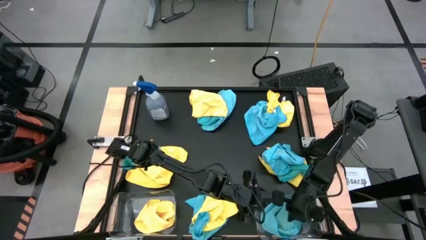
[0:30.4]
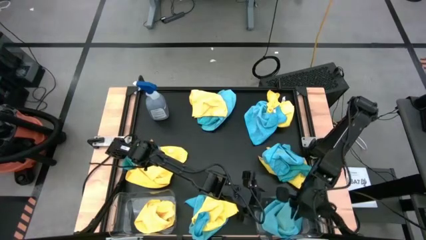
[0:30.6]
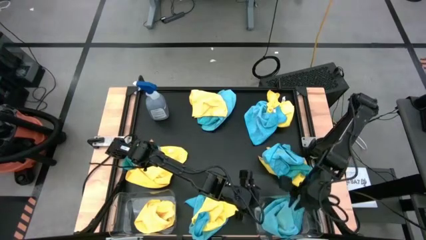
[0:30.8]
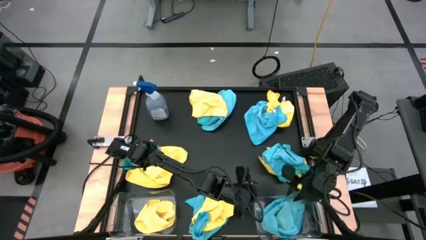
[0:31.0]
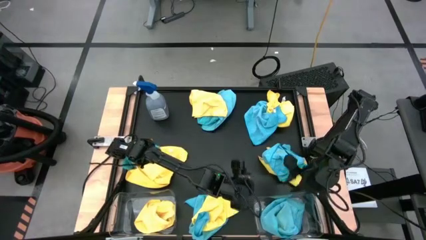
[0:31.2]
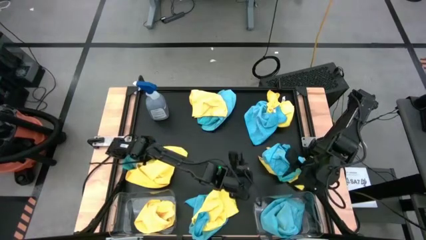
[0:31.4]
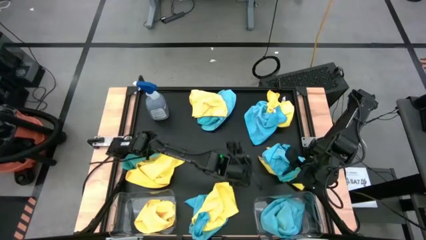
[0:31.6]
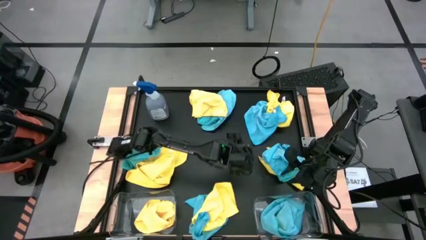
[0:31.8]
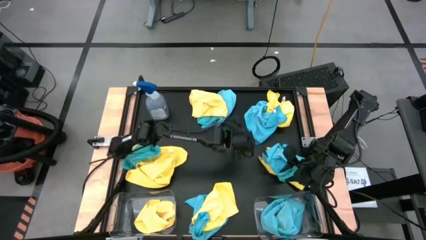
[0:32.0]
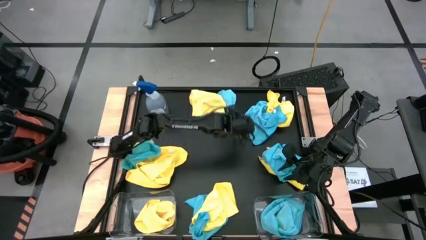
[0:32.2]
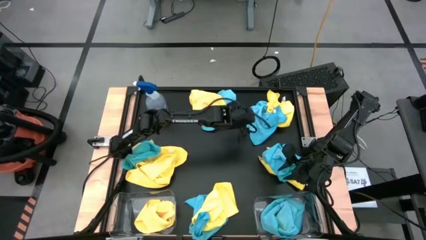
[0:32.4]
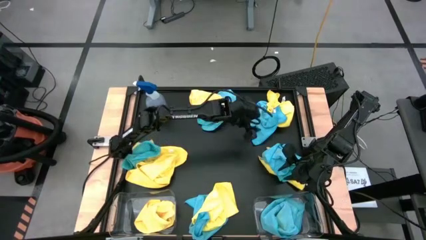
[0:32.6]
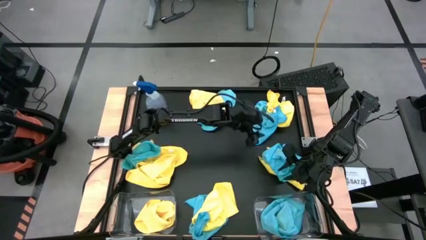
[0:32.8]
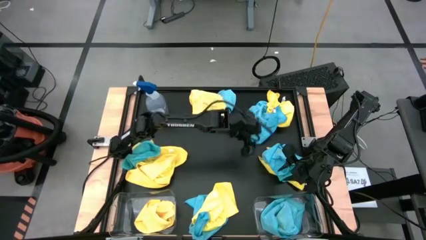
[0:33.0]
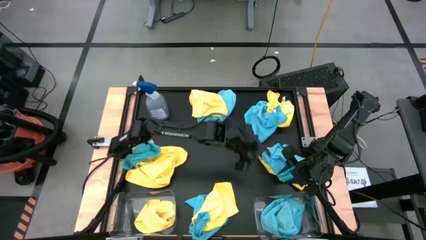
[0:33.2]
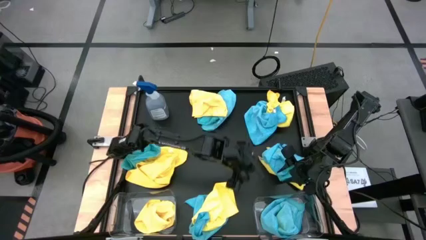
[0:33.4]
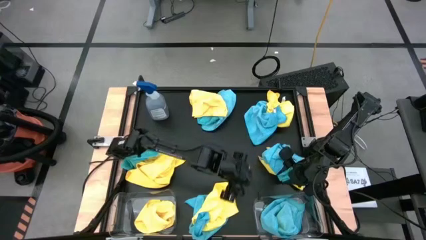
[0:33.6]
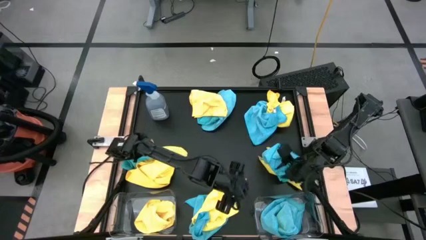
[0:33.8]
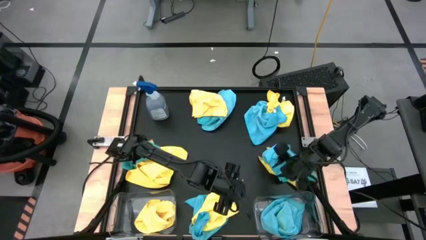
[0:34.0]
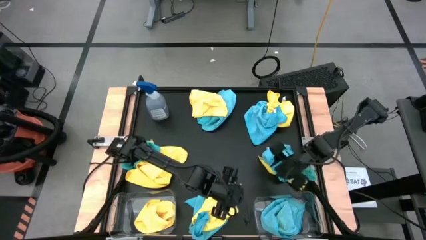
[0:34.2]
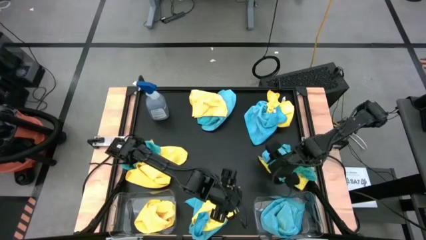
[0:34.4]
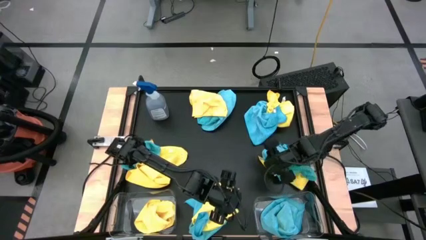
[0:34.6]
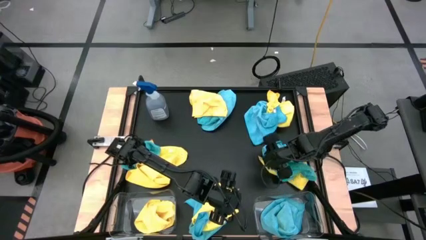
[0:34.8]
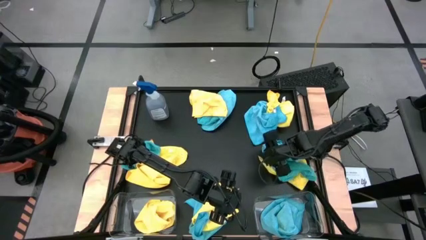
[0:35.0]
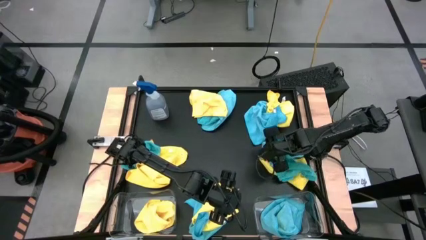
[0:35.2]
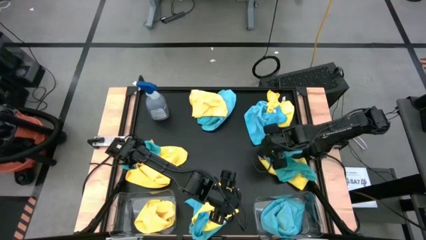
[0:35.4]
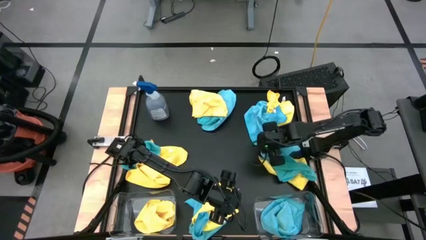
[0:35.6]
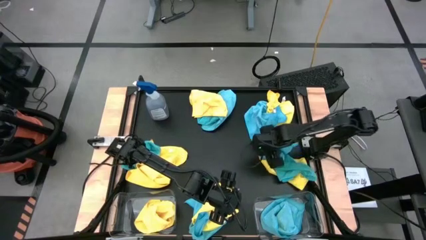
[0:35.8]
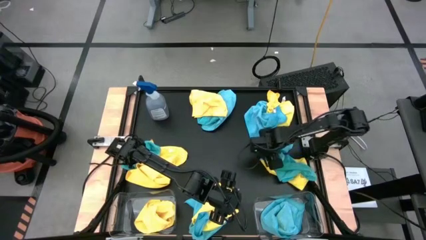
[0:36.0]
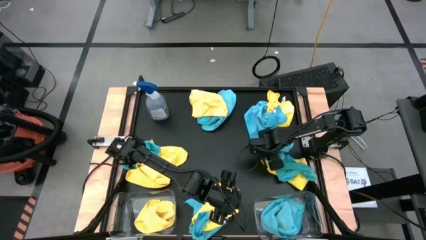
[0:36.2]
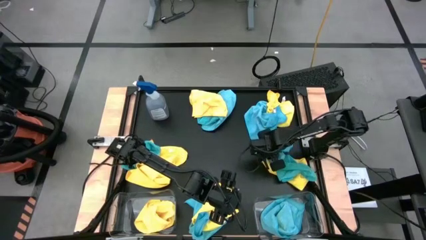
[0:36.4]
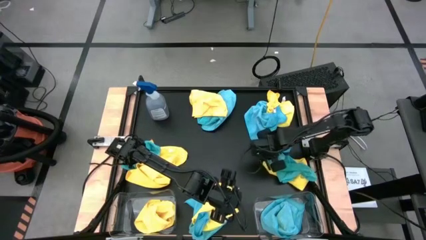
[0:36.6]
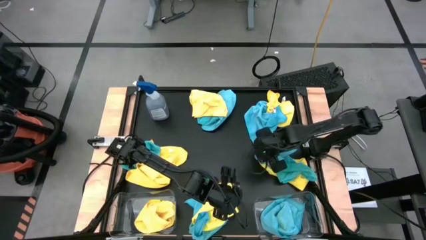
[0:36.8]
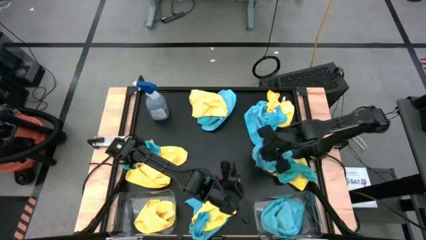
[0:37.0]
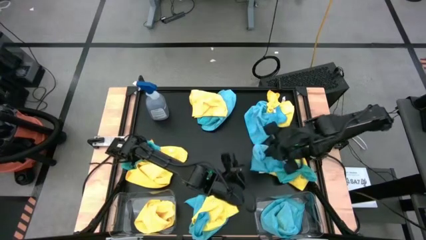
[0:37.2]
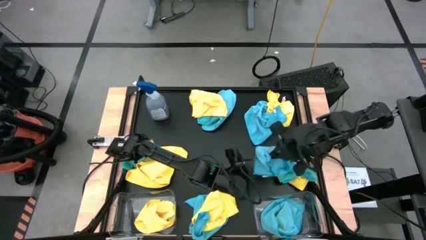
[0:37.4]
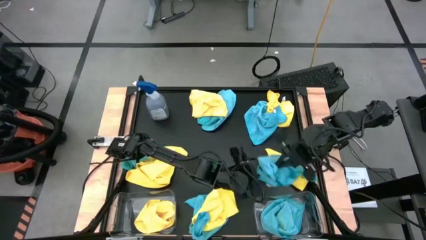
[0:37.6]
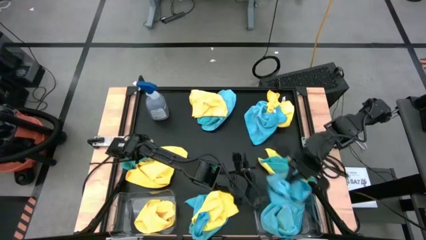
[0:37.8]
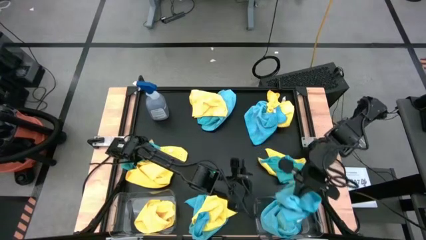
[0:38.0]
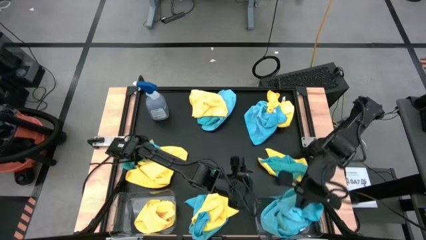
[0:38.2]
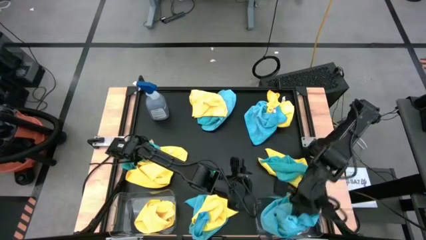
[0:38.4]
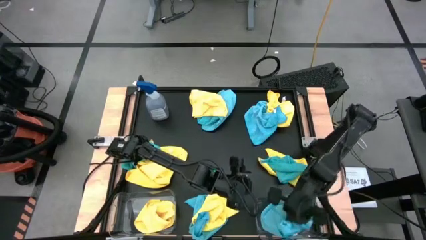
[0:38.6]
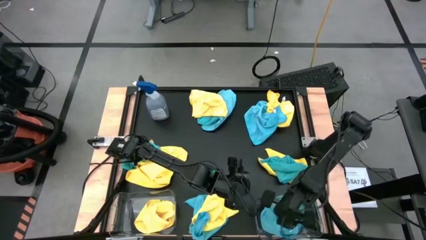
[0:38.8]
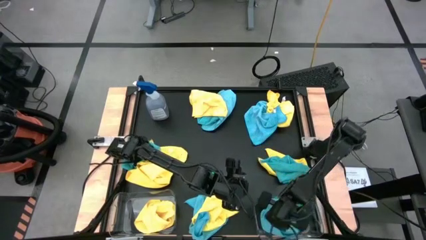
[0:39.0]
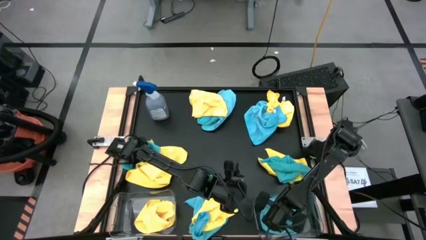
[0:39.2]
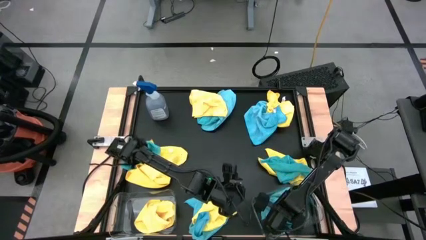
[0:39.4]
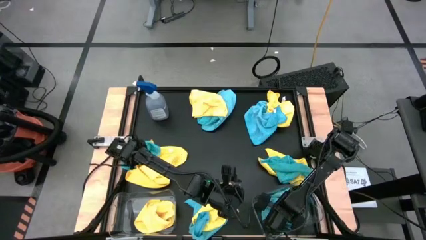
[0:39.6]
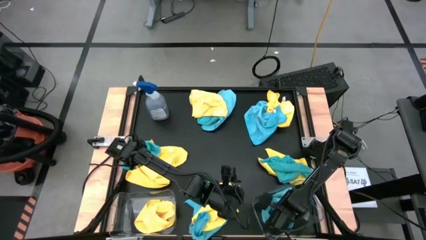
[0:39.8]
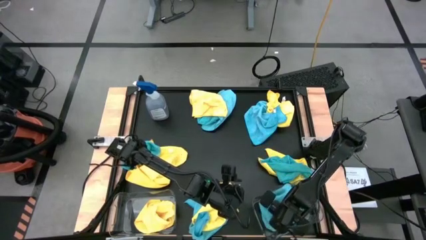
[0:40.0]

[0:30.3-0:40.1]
Task: Sort microfiber towel by color & place in baskets
Put the blue towel into the right transparent bin

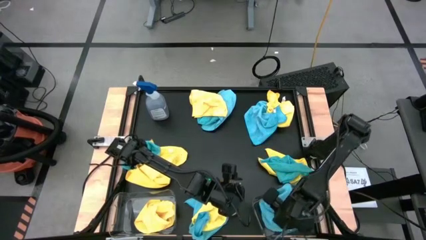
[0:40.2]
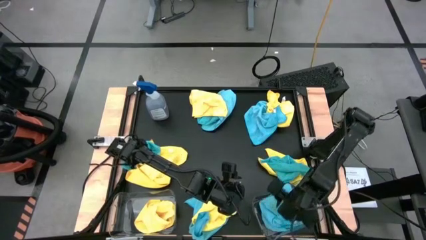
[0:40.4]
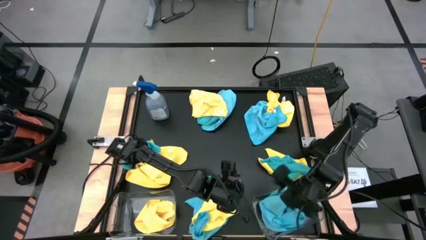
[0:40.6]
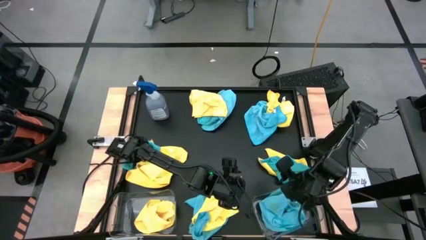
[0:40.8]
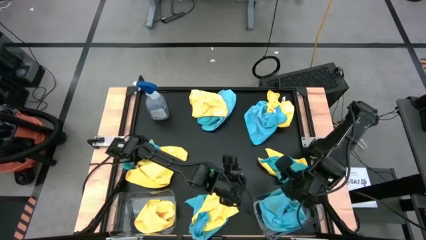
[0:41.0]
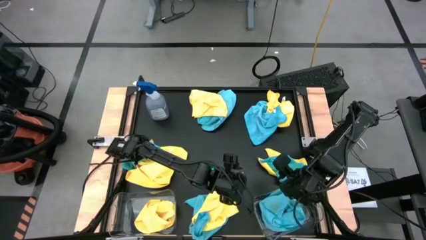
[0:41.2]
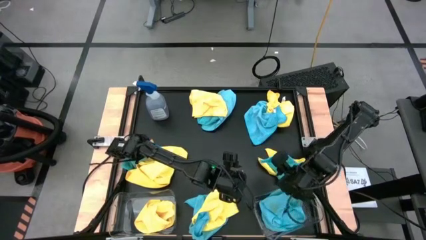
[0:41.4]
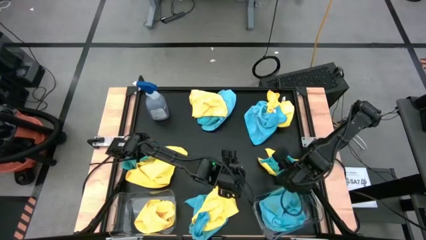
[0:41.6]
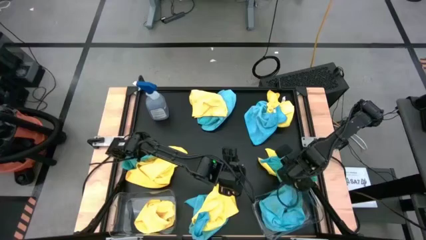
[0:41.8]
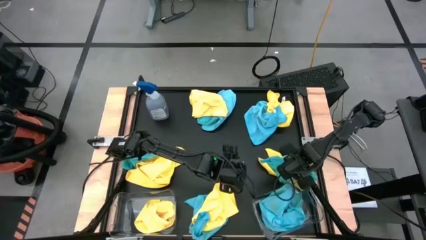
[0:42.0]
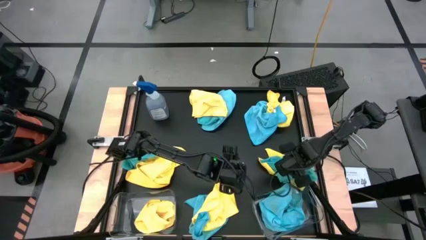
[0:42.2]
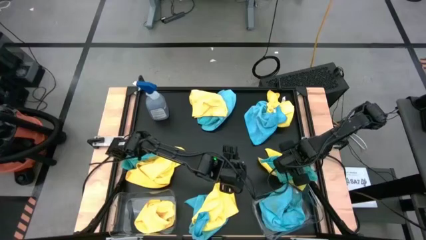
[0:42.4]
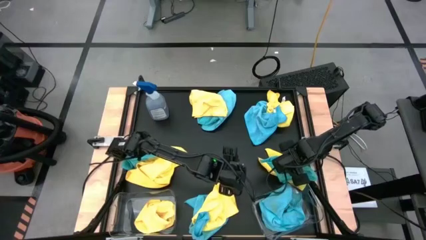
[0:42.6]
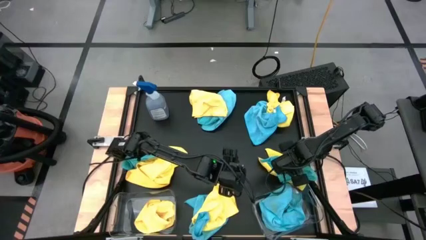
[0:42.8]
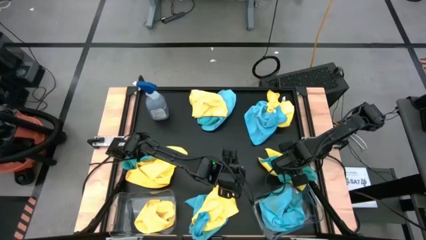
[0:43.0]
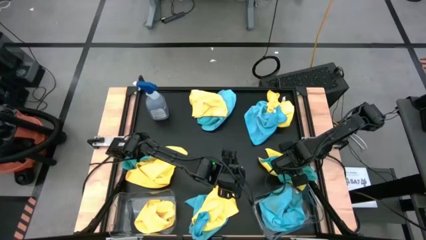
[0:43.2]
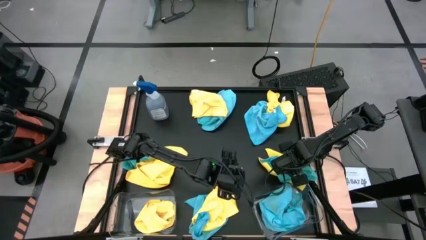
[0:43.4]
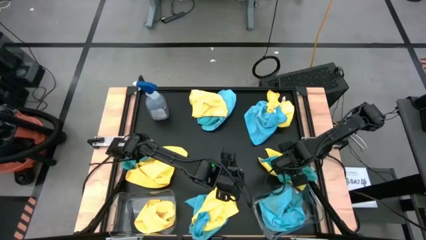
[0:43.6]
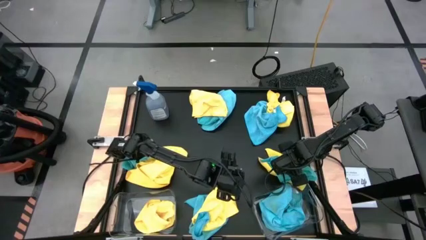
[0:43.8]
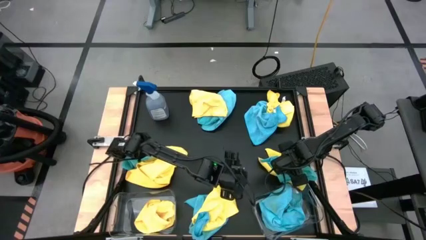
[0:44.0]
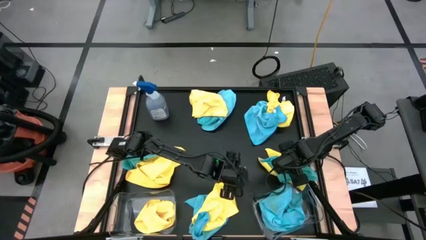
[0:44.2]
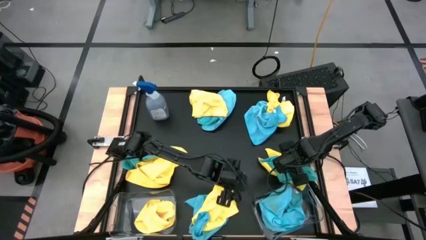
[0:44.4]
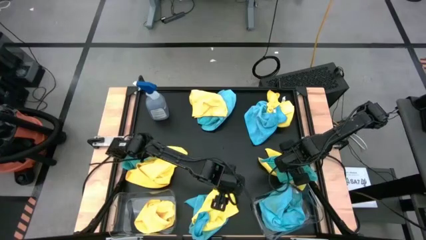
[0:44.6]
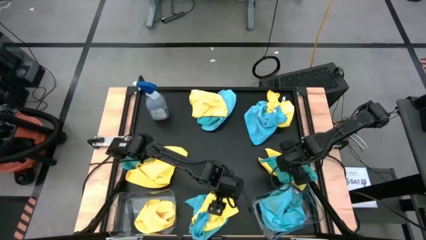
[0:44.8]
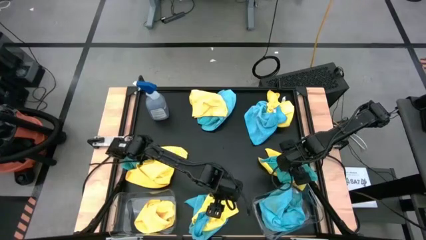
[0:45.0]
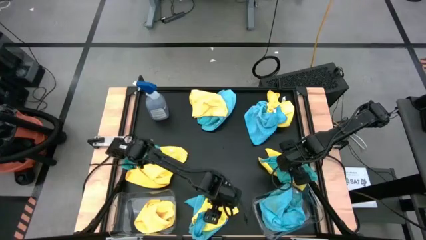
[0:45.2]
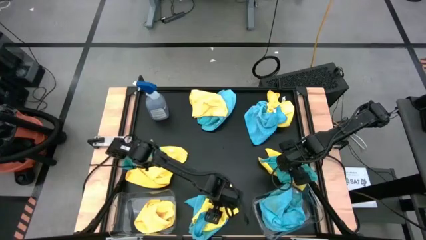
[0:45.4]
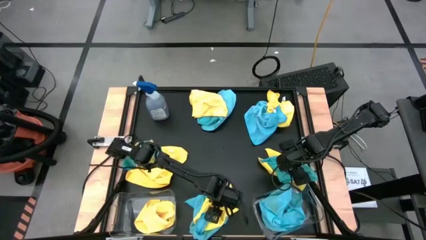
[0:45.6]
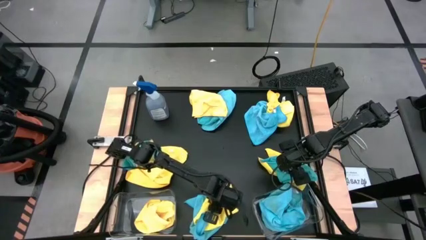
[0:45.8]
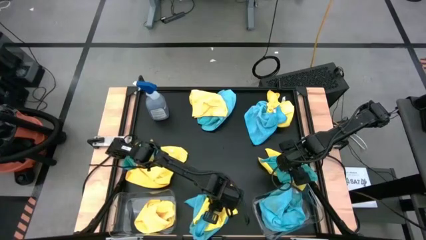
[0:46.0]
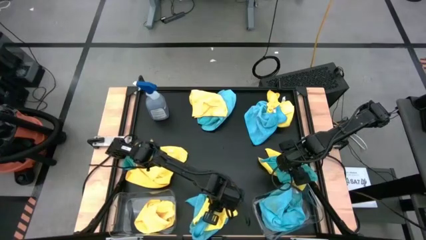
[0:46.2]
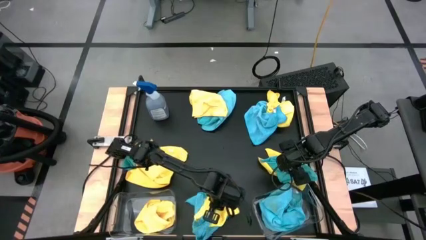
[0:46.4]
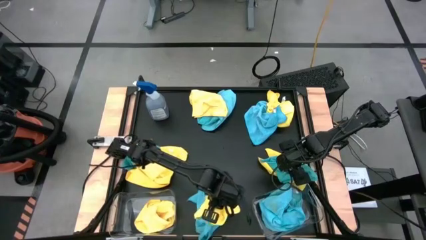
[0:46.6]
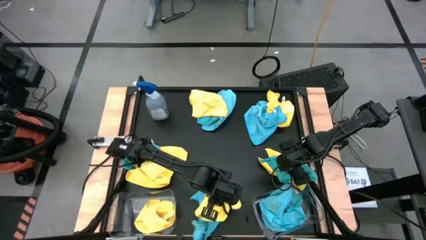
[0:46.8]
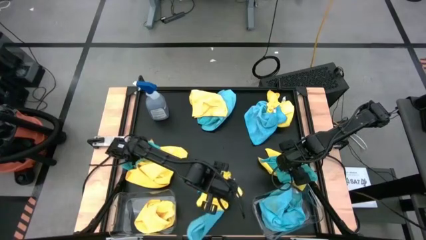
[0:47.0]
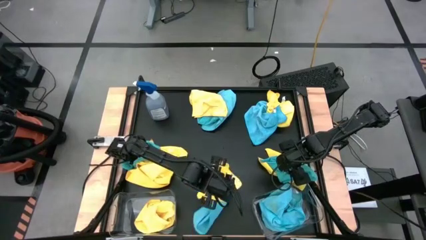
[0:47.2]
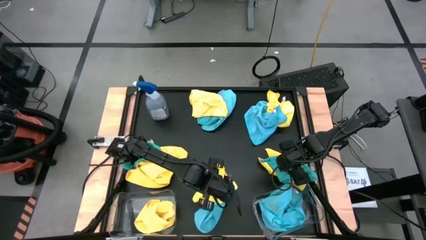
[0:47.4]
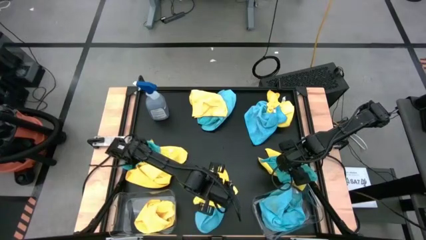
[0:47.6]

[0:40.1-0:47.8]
Put the yellow towel into the left transparent bin
